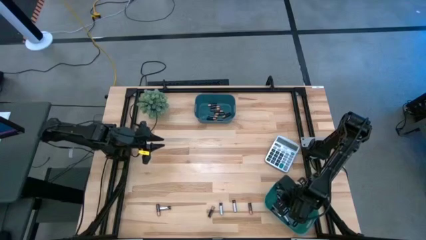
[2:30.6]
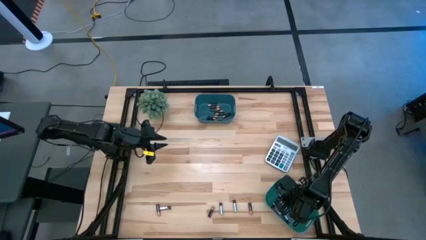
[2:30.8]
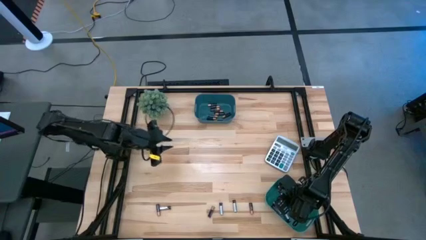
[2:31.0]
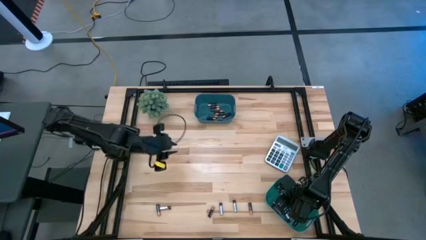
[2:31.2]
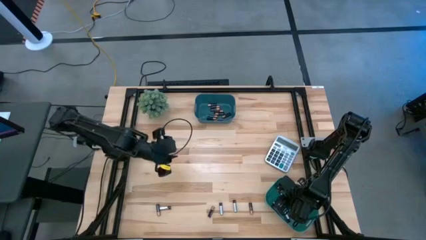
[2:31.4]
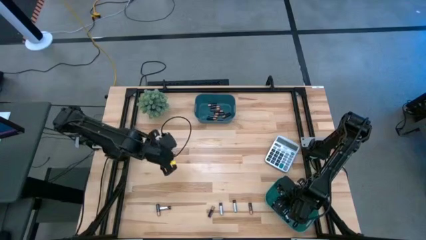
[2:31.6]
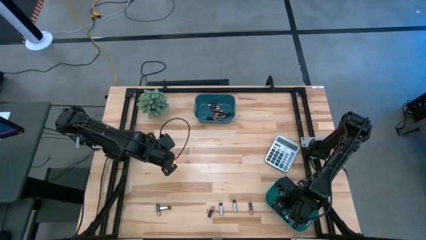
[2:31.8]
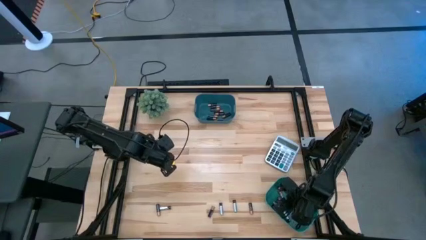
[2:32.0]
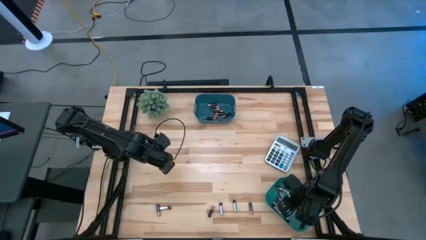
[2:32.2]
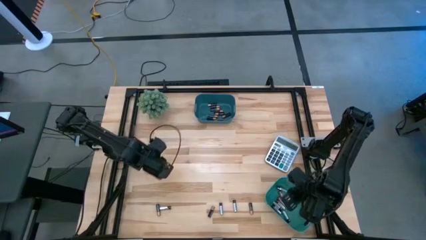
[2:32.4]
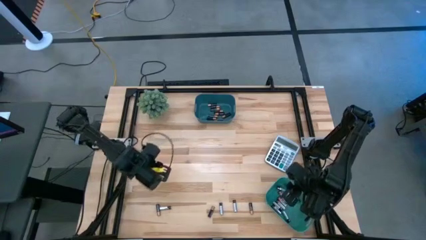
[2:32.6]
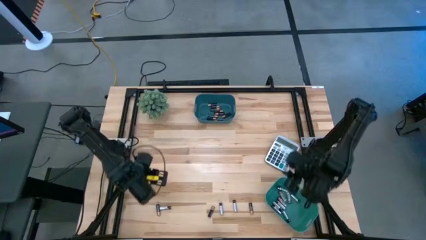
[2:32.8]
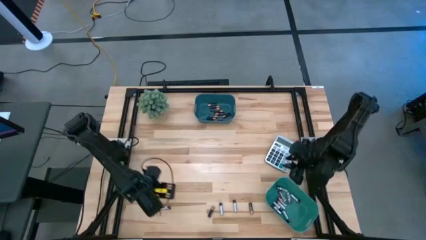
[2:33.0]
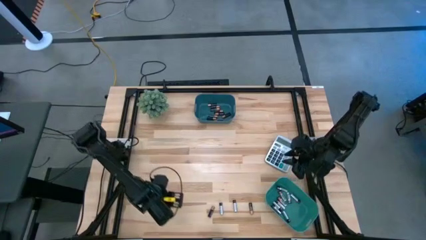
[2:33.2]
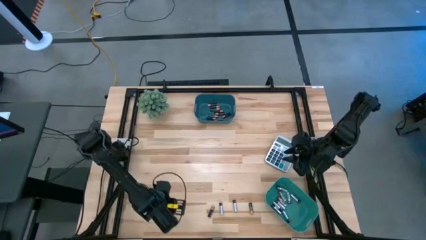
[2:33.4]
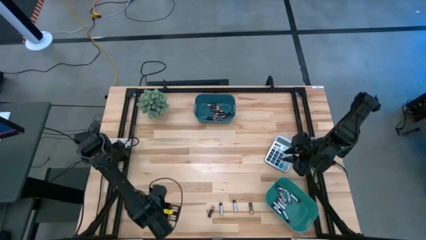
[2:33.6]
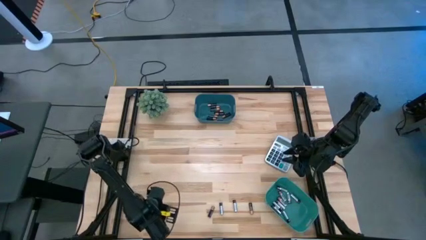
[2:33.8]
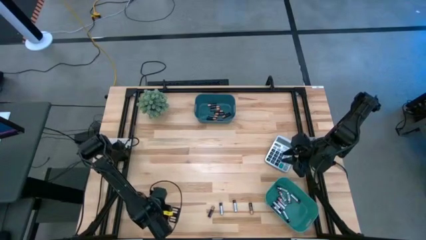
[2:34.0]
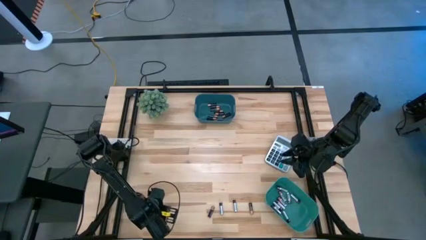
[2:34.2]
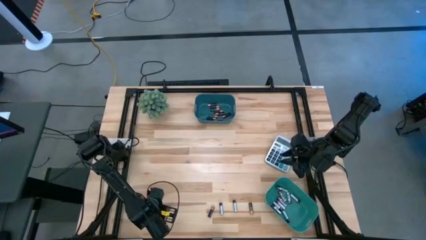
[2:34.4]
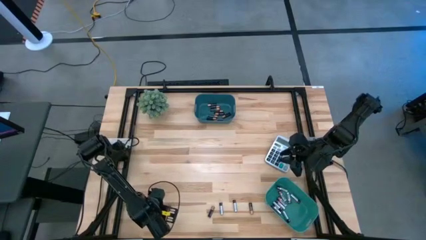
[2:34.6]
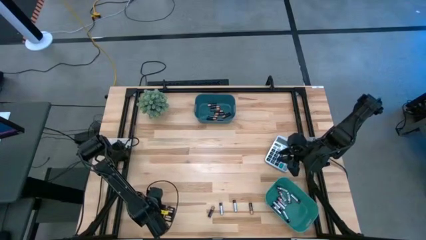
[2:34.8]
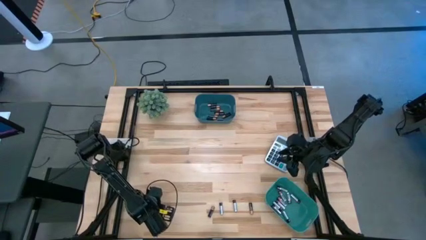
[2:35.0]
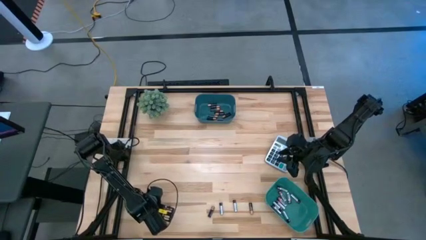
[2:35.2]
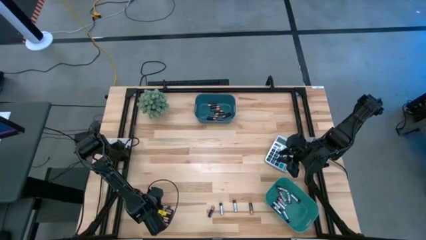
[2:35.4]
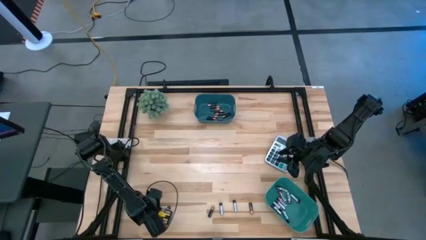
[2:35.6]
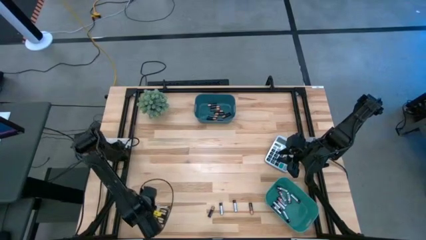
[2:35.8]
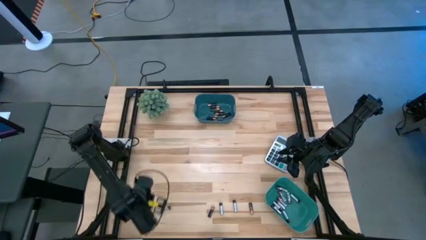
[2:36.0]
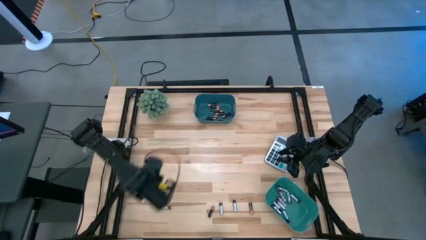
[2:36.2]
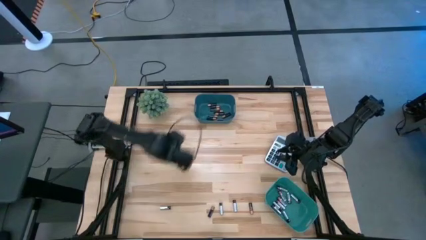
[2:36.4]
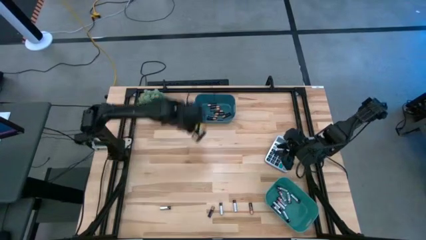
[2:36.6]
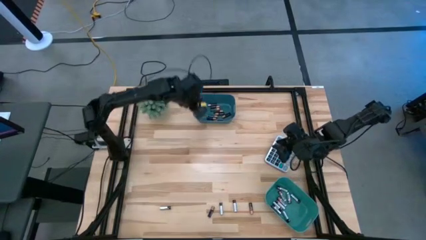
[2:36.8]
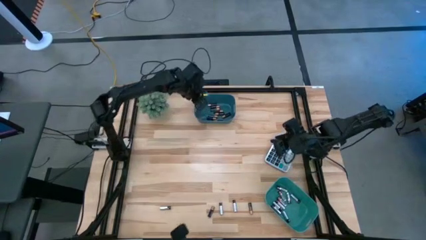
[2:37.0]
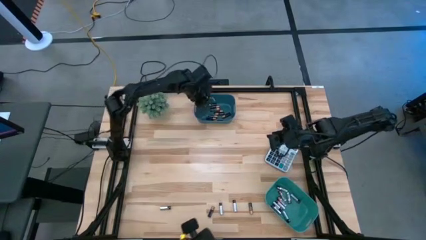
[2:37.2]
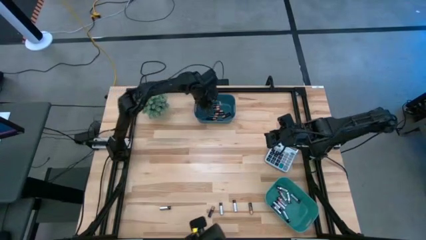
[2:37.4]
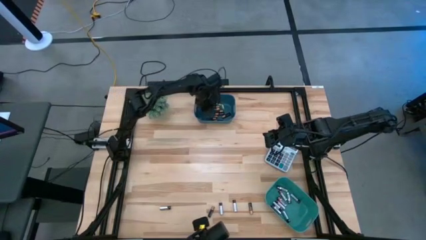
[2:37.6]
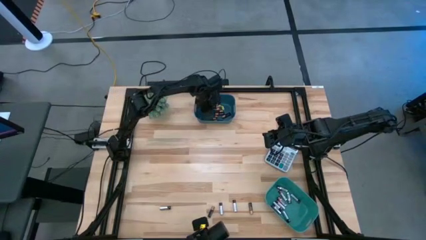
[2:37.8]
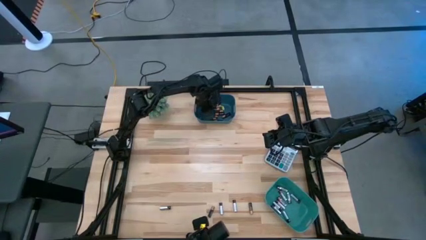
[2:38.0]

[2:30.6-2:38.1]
Task: Sort batteries
Put the black battery into the blue bin

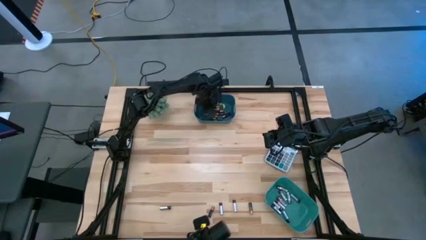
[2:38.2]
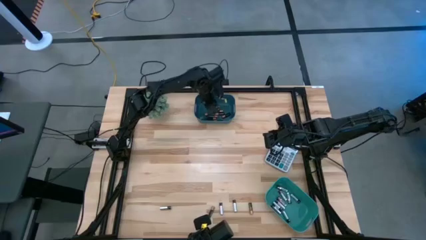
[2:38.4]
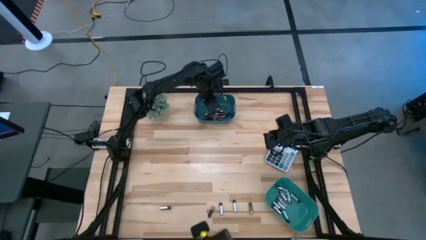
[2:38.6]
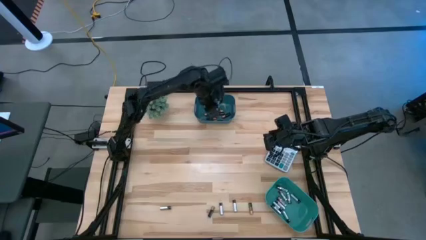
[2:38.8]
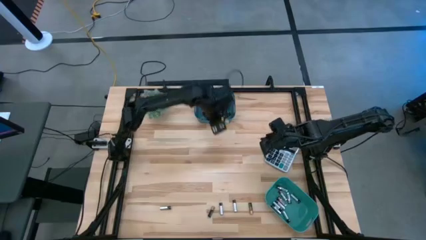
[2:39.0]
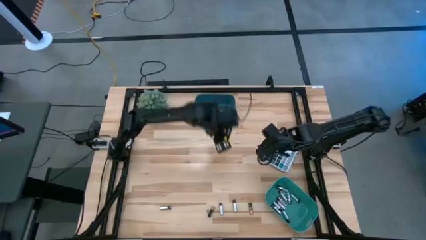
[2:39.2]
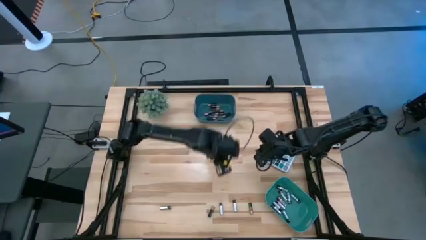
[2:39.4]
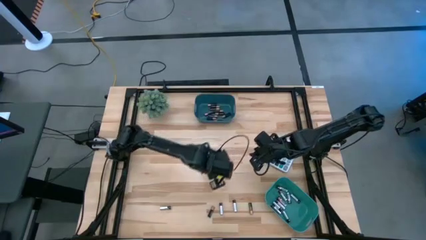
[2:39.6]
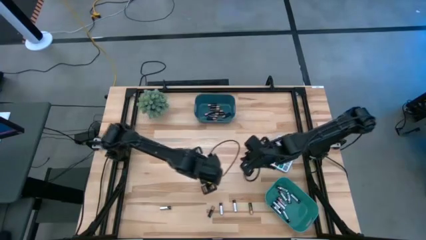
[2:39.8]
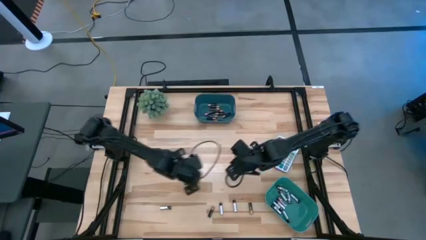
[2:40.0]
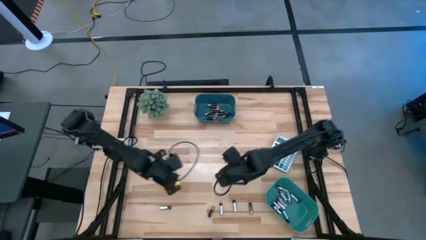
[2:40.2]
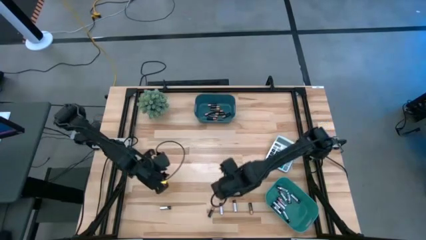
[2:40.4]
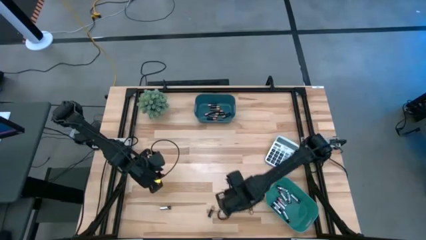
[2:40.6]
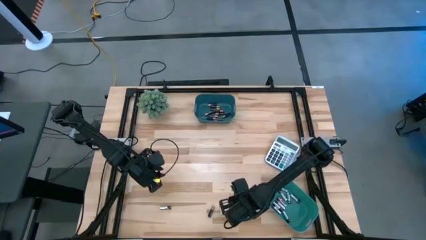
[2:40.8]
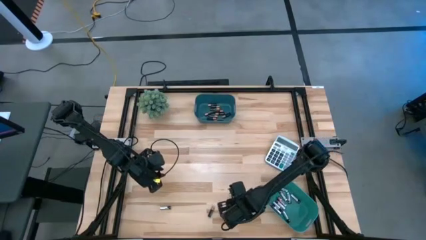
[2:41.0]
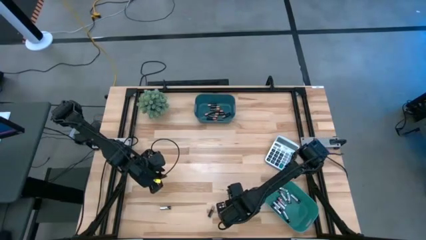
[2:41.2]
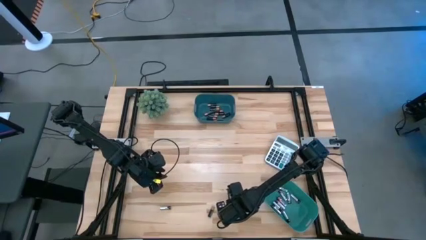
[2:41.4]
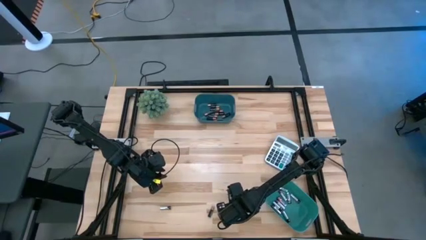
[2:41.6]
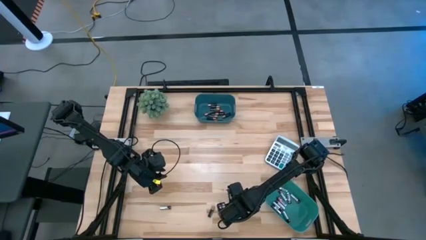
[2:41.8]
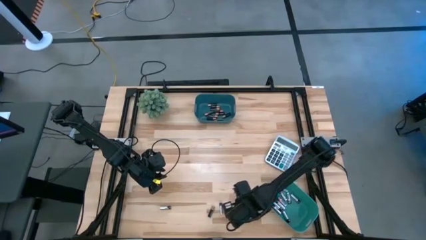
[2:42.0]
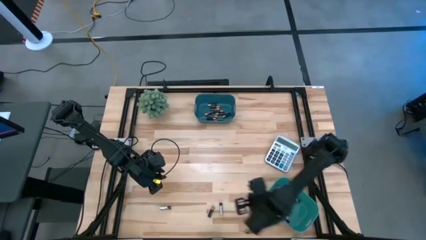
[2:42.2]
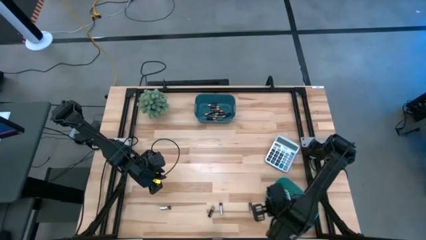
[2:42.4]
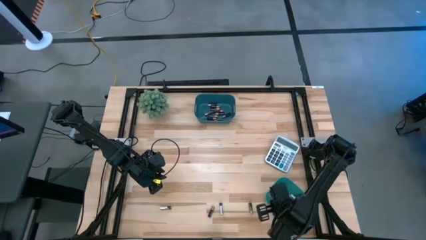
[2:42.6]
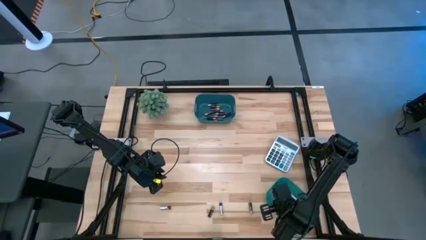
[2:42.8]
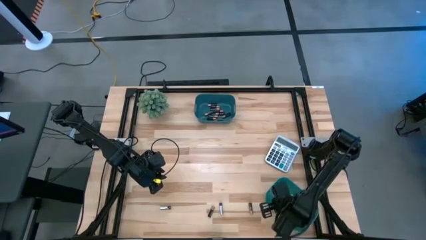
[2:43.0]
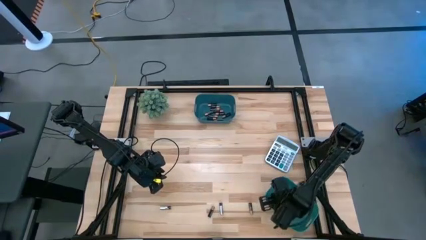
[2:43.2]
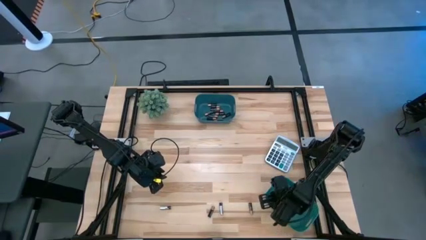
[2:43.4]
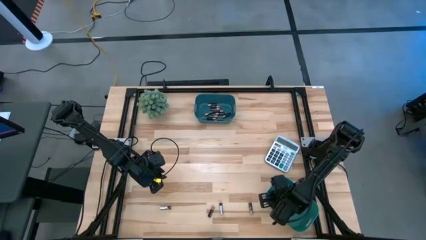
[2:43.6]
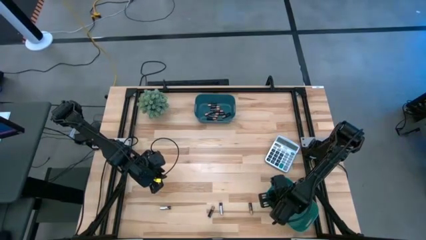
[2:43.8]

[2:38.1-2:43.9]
Put the silver battery into the green bin

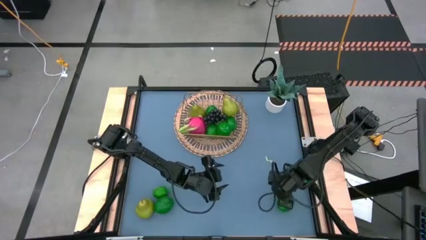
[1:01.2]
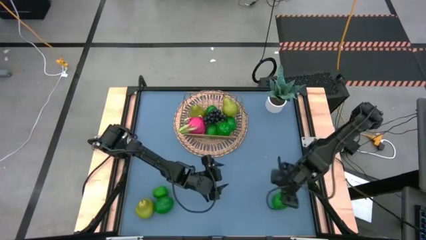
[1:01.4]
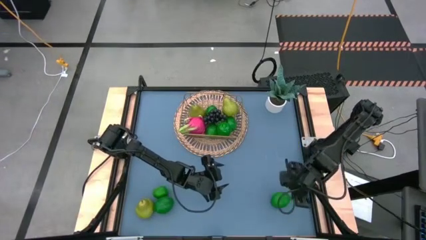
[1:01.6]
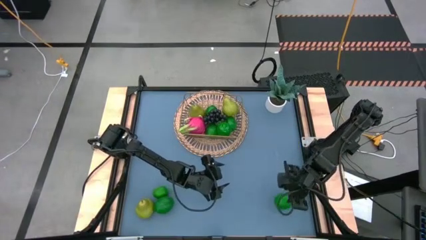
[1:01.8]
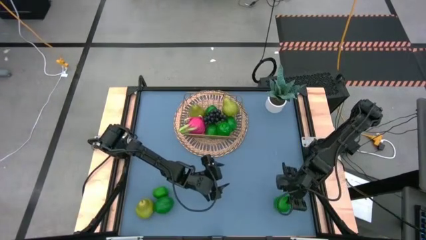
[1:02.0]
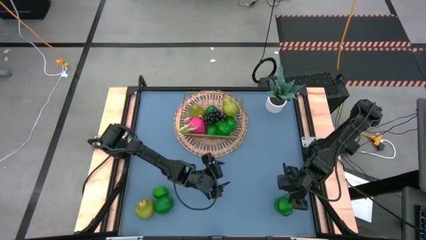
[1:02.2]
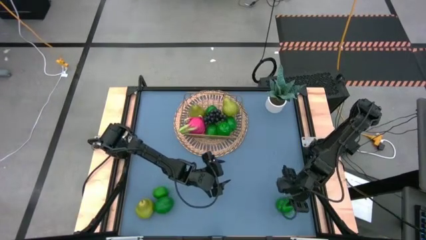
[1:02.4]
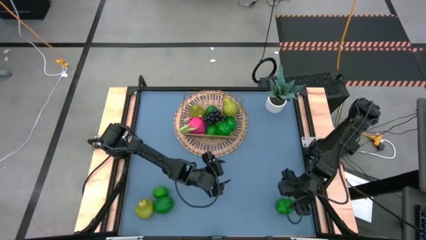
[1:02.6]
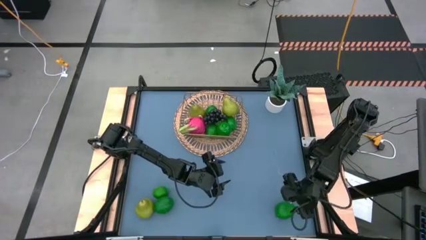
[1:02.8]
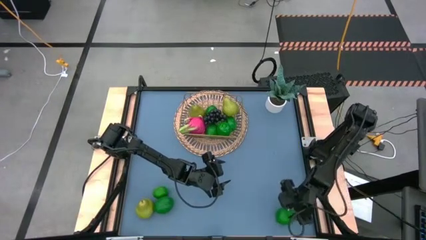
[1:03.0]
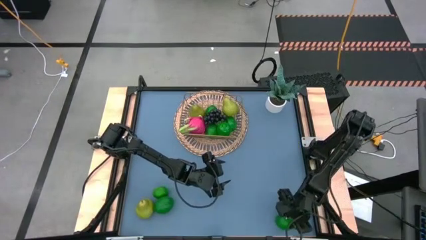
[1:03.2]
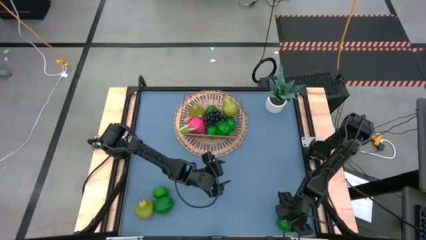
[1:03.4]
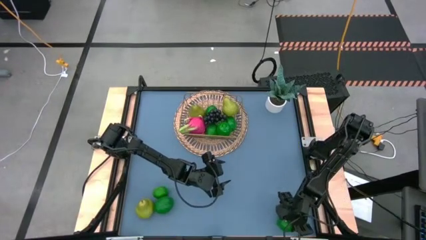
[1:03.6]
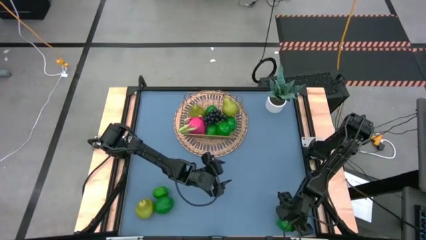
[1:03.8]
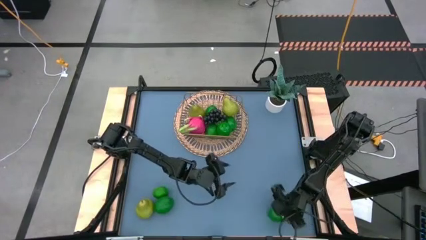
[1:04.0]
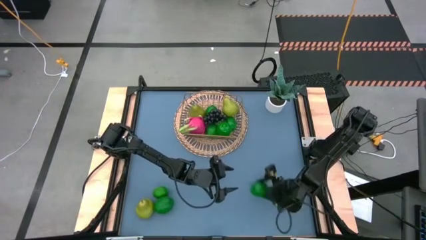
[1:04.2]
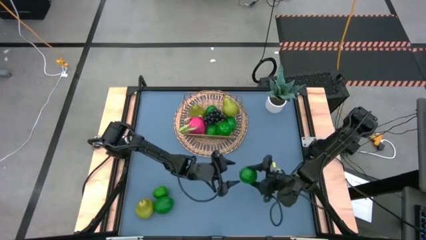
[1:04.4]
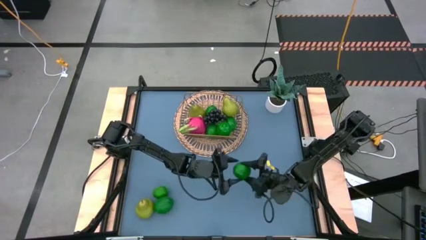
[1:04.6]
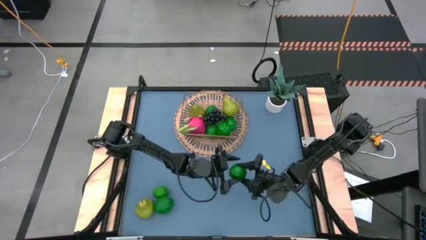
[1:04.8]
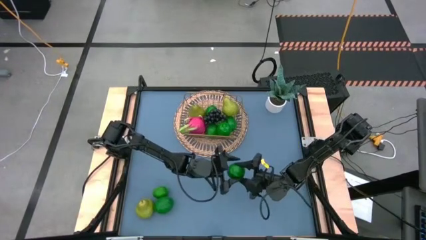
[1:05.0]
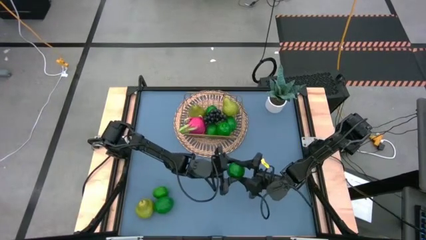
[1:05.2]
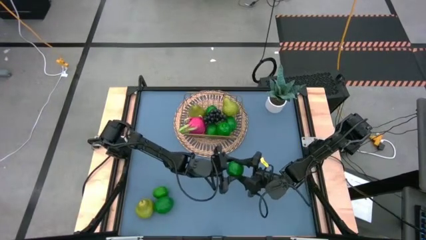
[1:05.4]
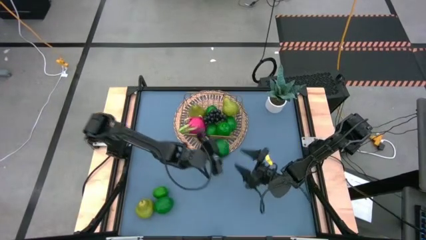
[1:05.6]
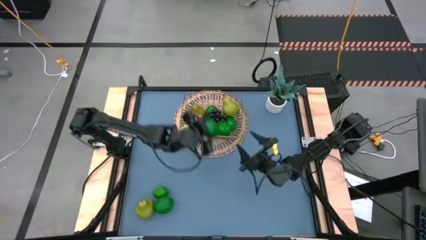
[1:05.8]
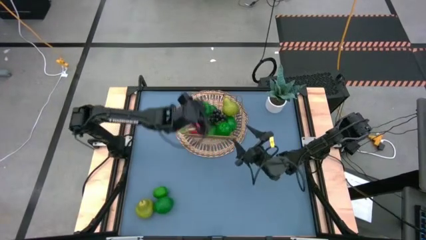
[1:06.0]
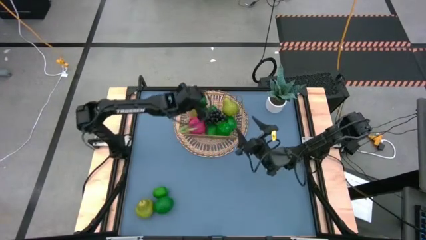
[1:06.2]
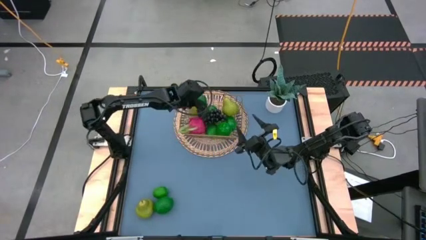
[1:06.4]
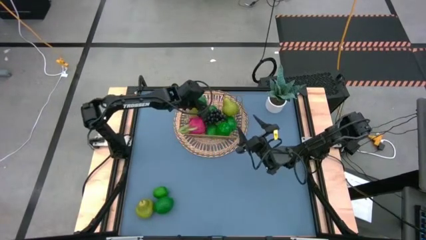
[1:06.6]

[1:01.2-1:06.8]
Task: Build produce basket
Put the green lime into the gold wire basket
